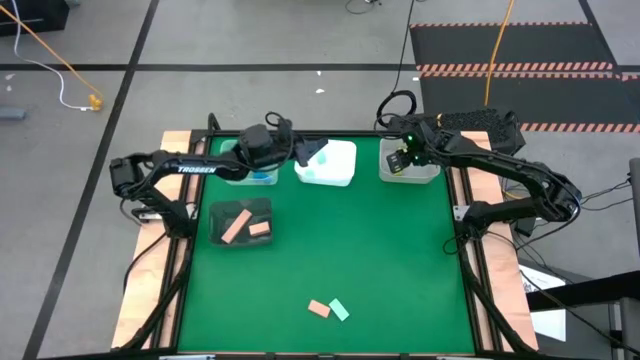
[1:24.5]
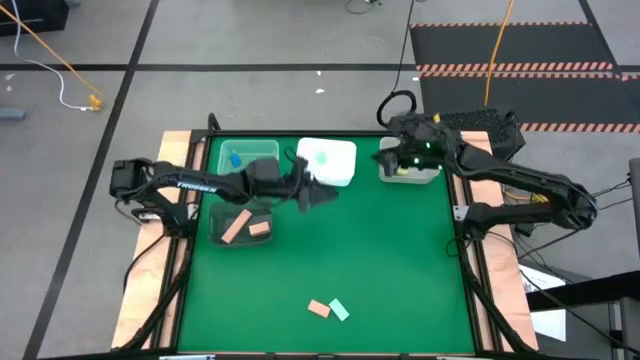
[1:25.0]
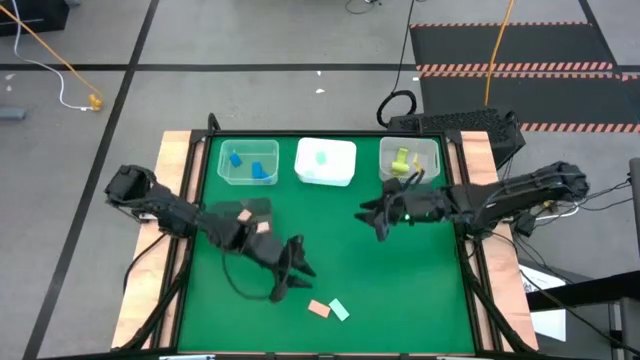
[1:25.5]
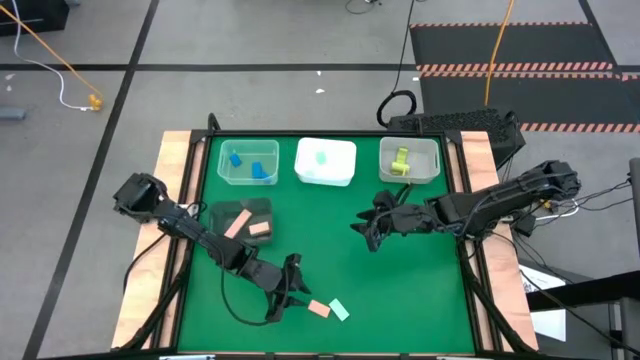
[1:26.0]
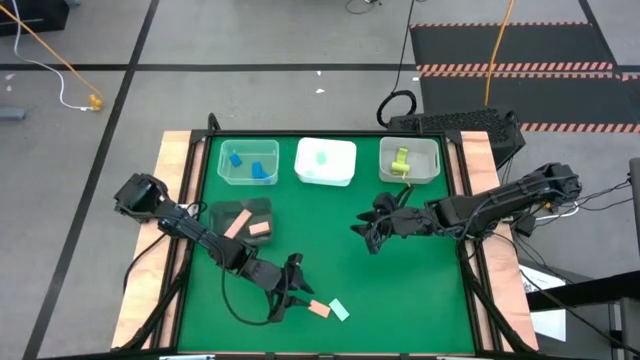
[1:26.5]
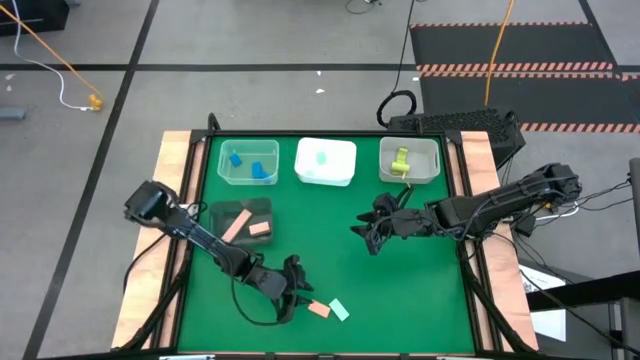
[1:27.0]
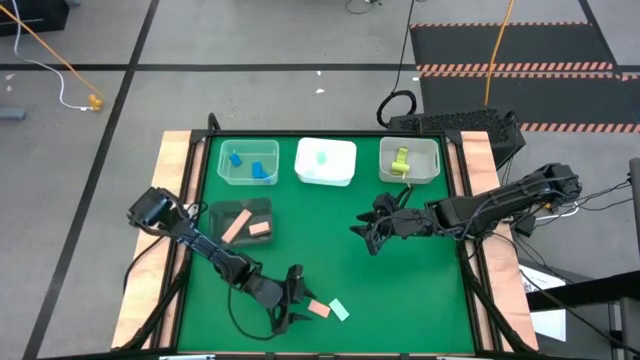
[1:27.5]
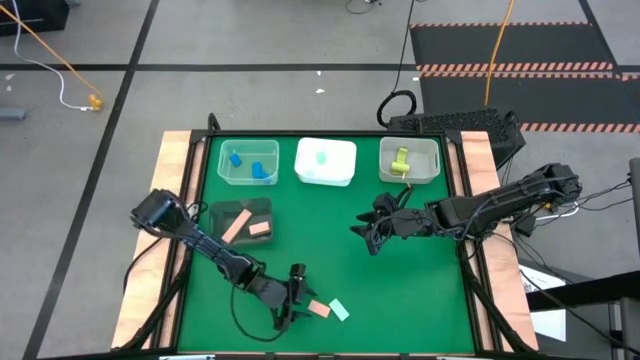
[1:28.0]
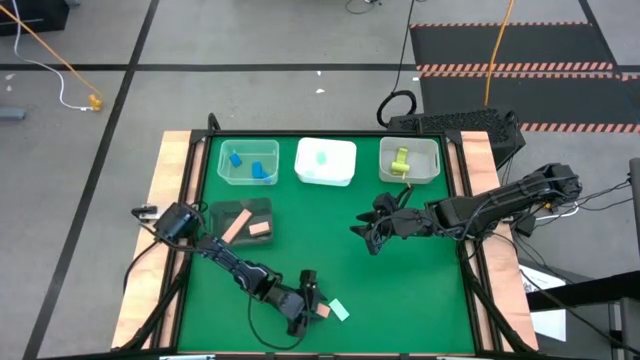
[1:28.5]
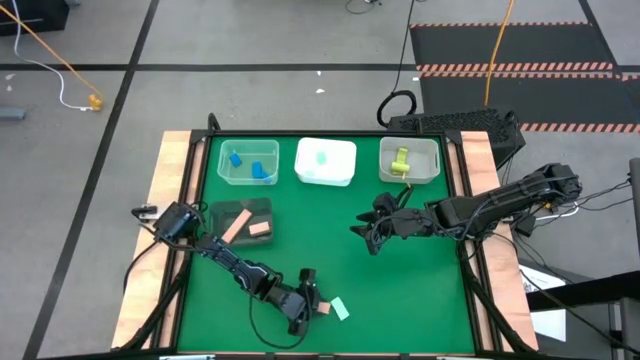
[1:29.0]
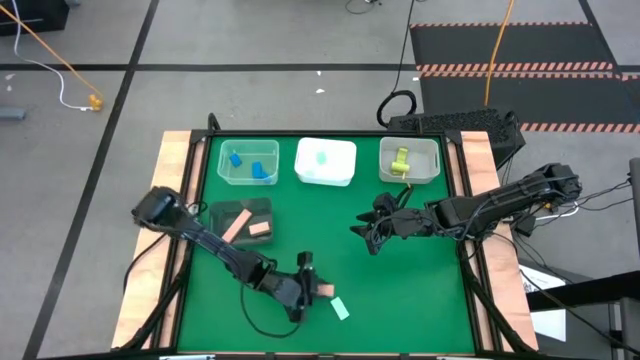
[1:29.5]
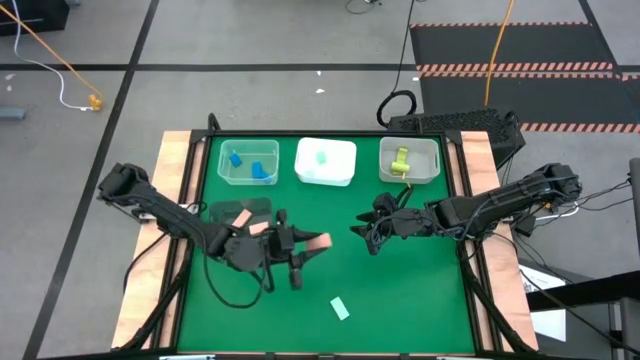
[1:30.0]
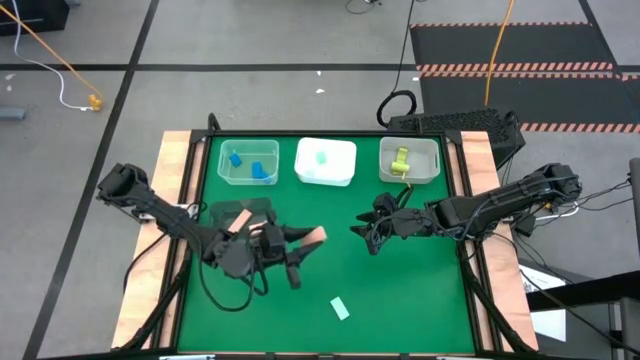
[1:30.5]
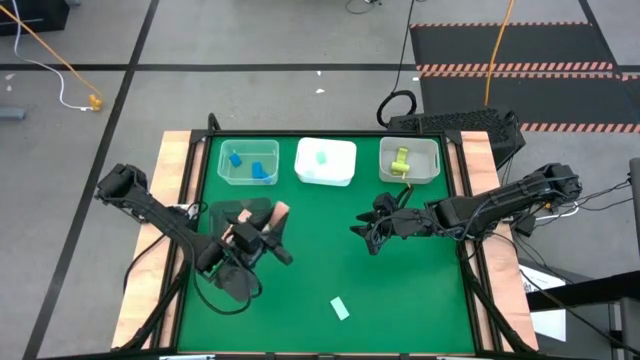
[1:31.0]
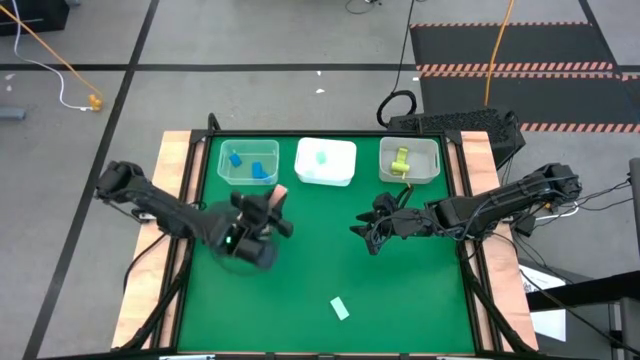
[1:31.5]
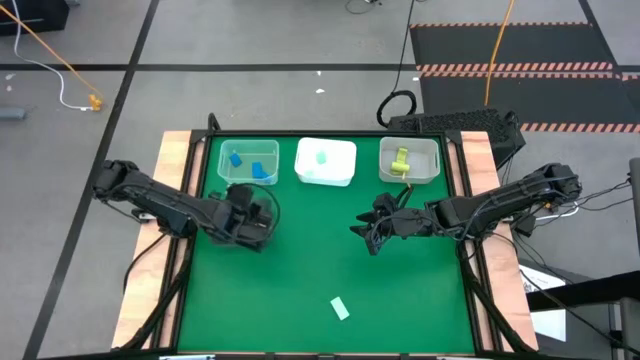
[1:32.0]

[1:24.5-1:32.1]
Task: Sort & place blocks by color
Put the light brown block into the black bin

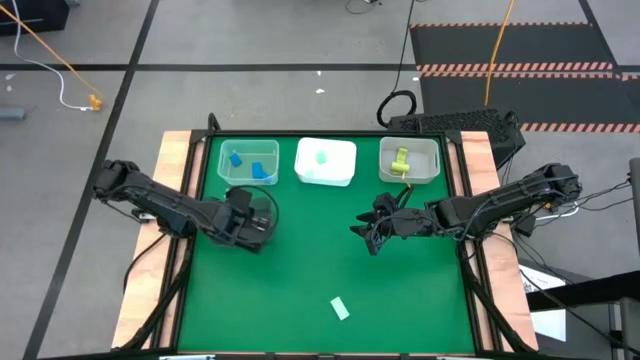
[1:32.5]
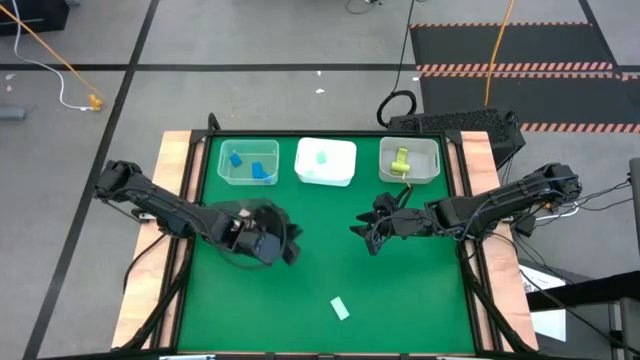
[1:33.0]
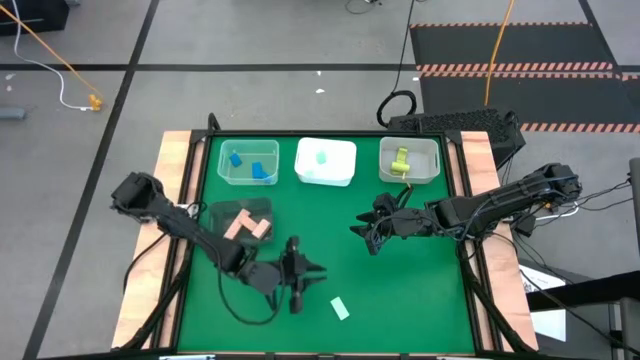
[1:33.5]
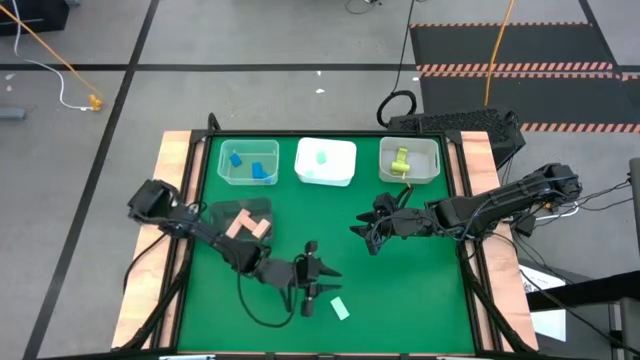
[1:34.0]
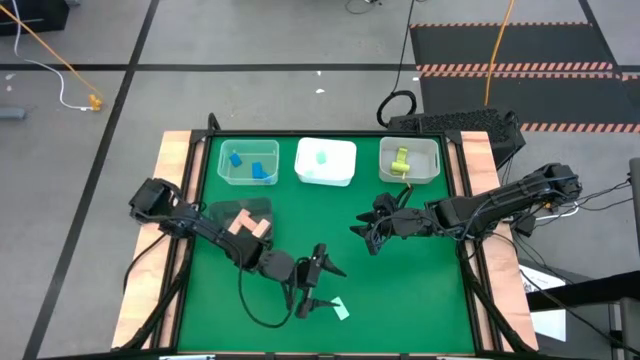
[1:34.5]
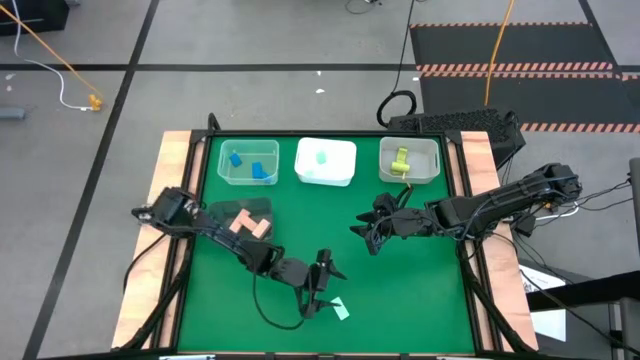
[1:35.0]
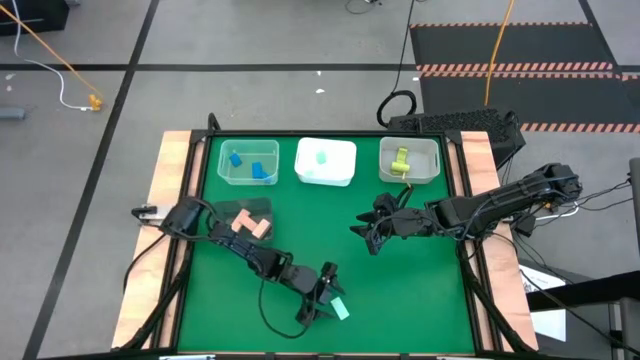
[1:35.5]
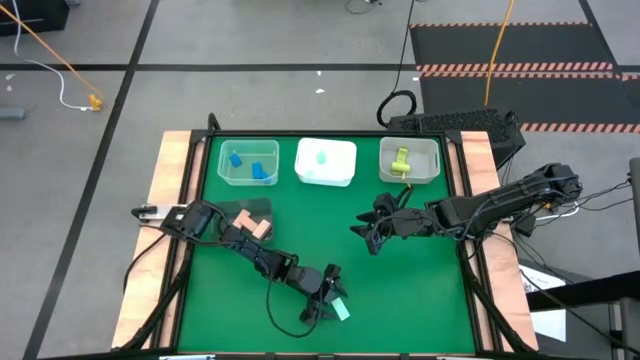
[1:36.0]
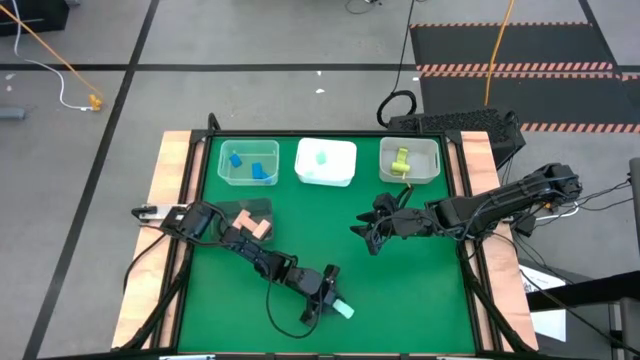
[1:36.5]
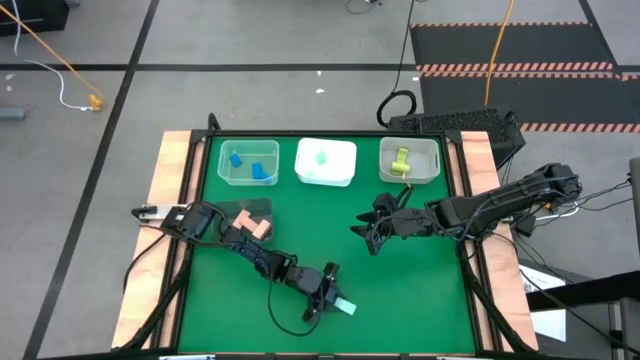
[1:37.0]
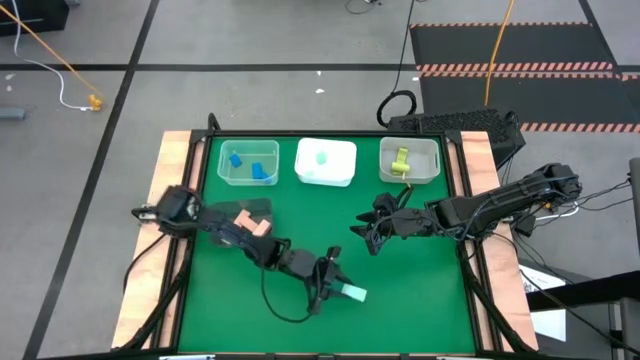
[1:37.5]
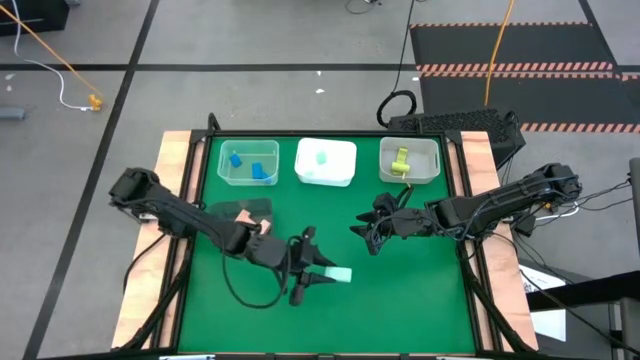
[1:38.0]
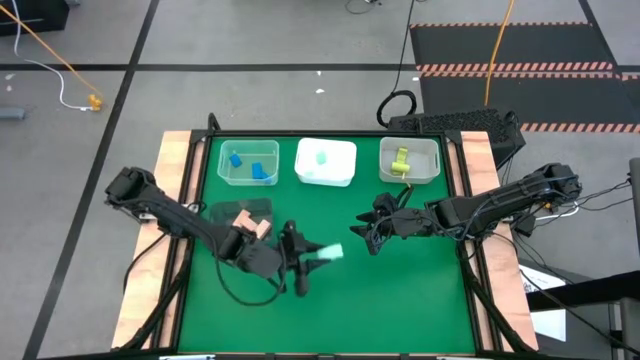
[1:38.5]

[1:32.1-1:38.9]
Put the light blue block into the white bin

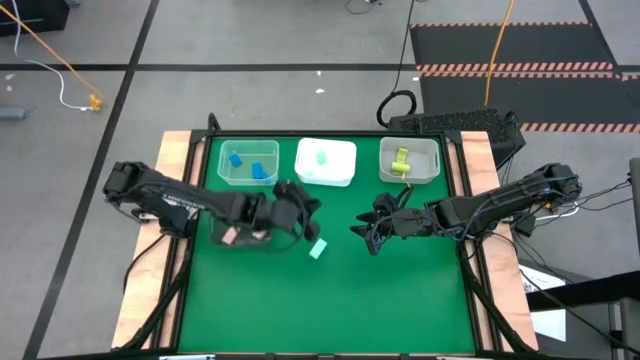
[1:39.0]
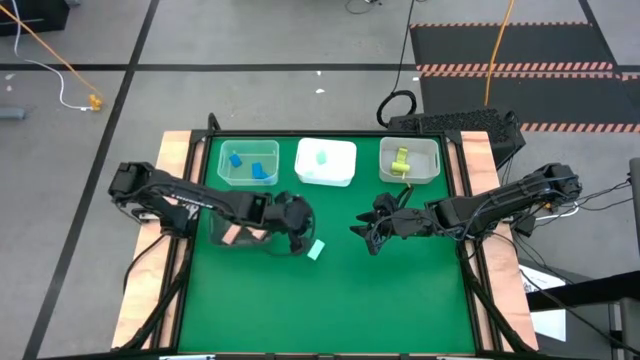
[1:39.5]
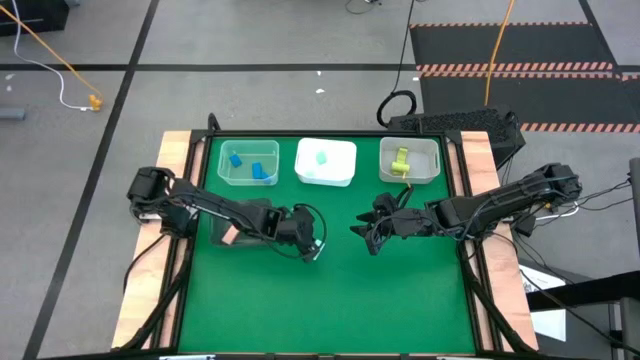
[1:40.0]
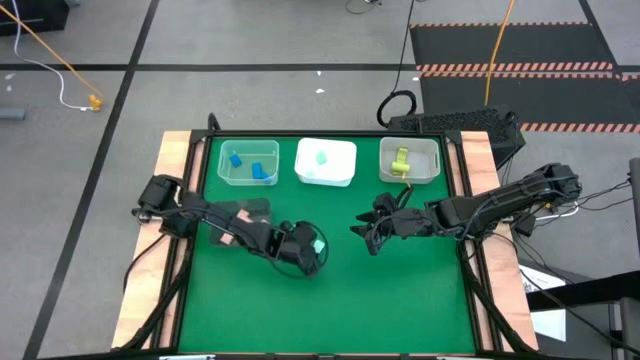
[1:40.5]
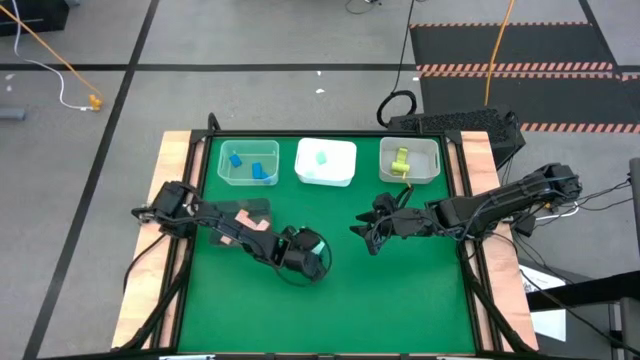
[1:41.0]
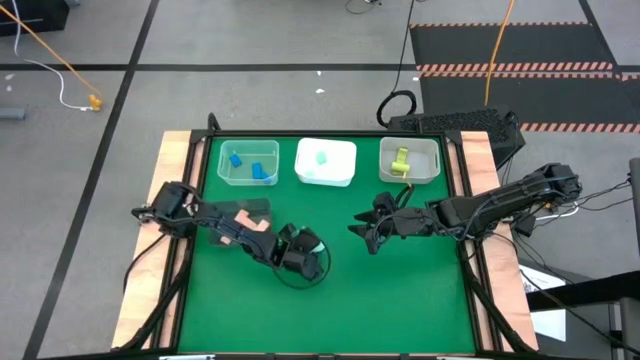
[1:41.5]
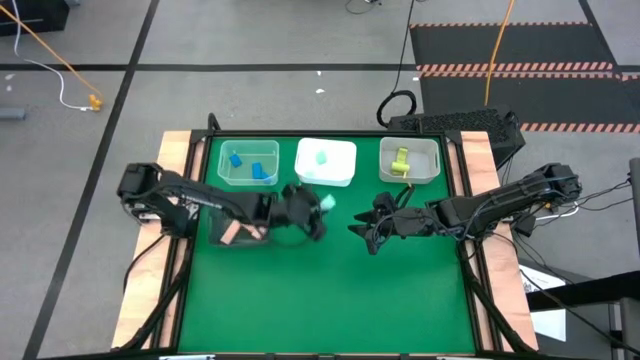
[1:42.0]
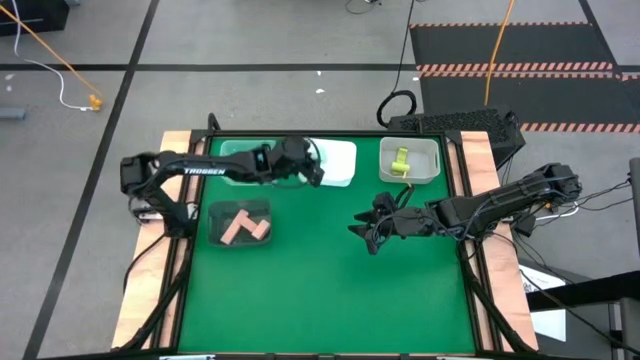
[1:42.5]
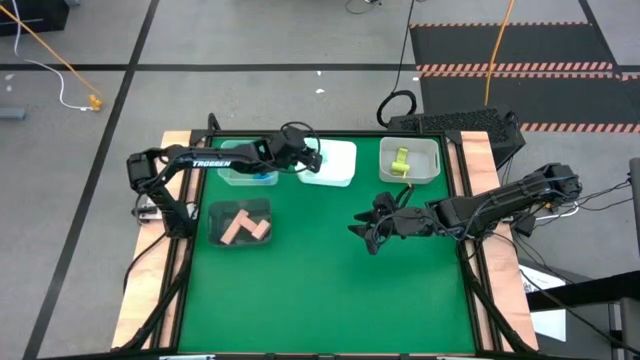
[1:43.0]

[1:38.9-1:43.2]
Put the light blue block into the white bin
